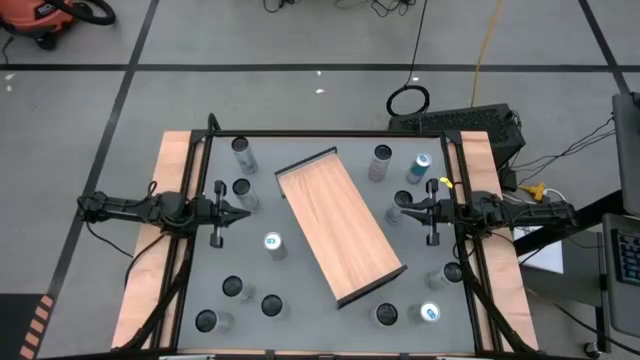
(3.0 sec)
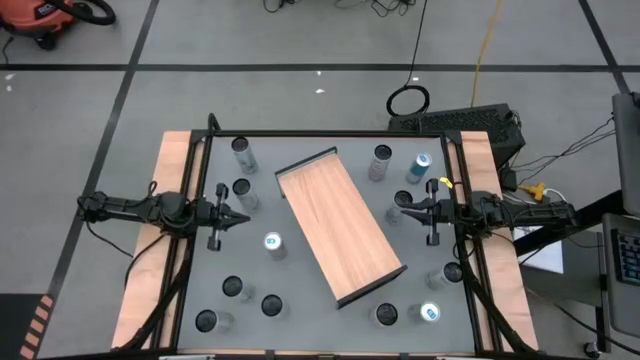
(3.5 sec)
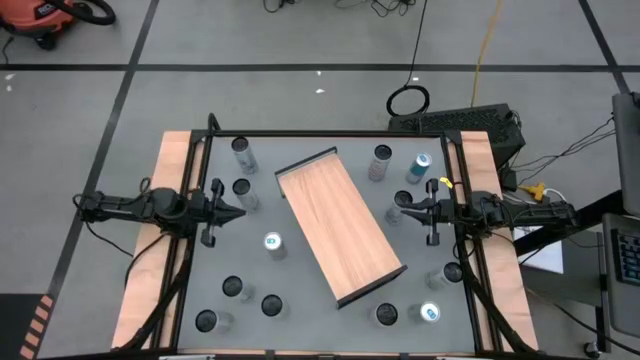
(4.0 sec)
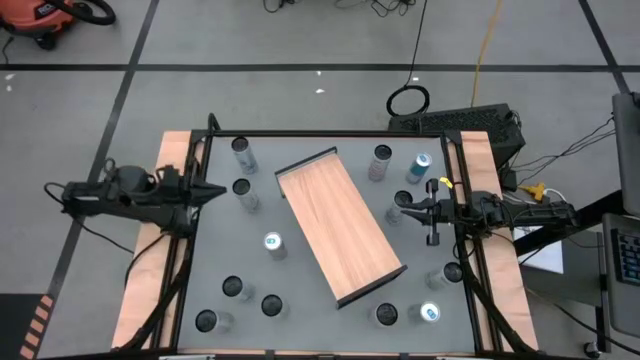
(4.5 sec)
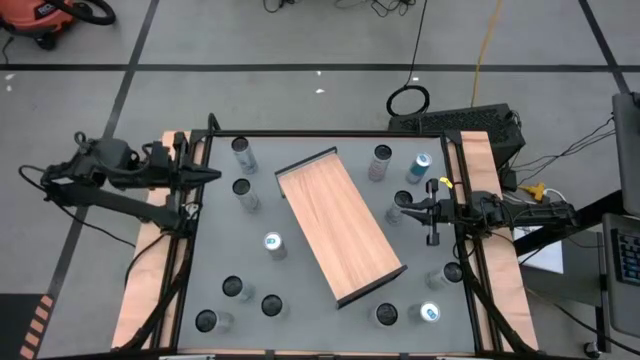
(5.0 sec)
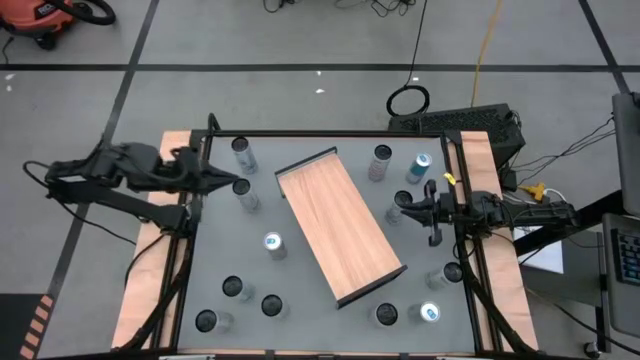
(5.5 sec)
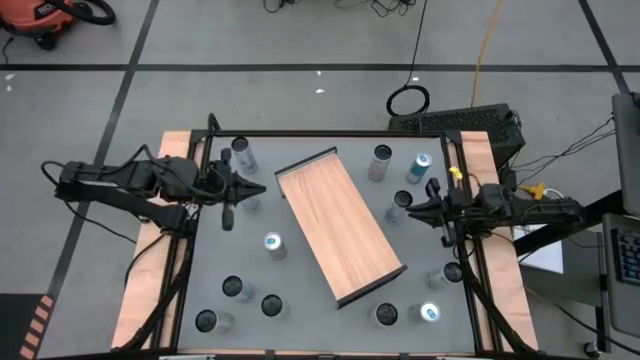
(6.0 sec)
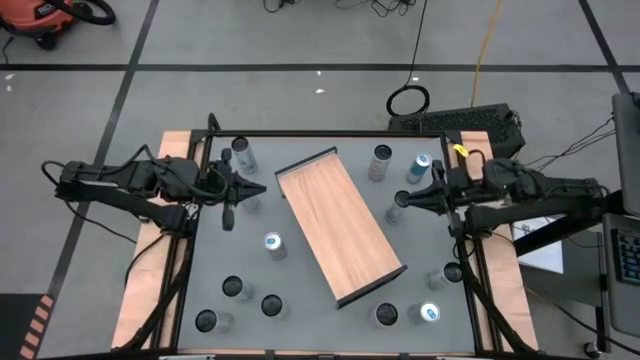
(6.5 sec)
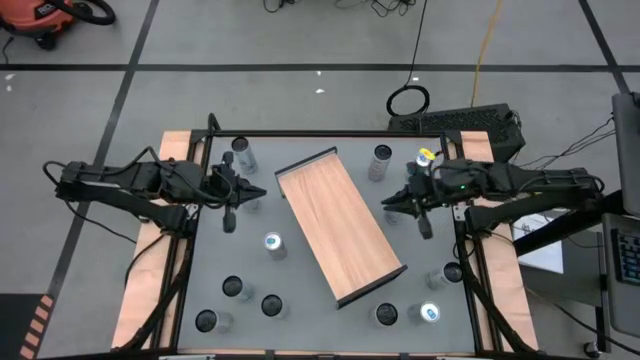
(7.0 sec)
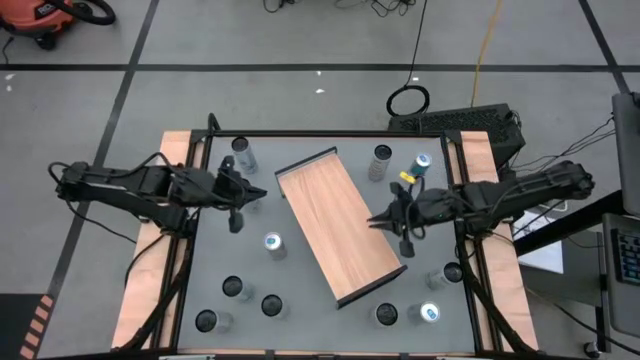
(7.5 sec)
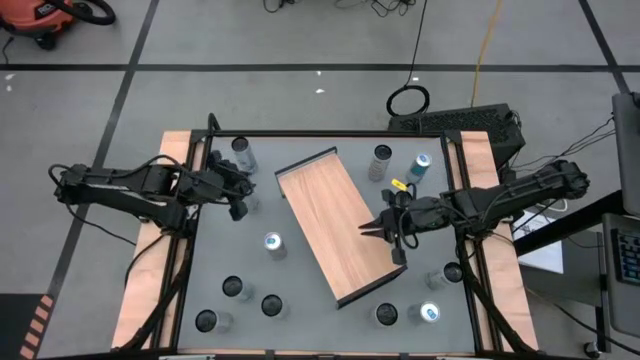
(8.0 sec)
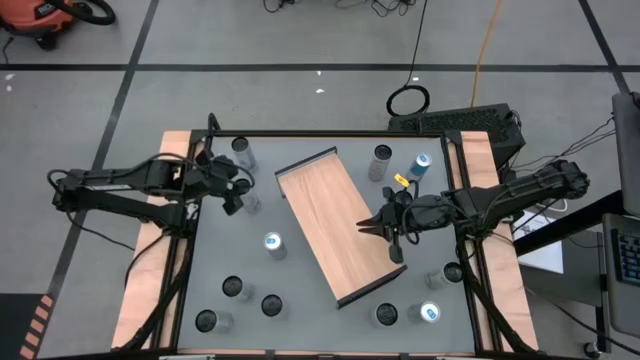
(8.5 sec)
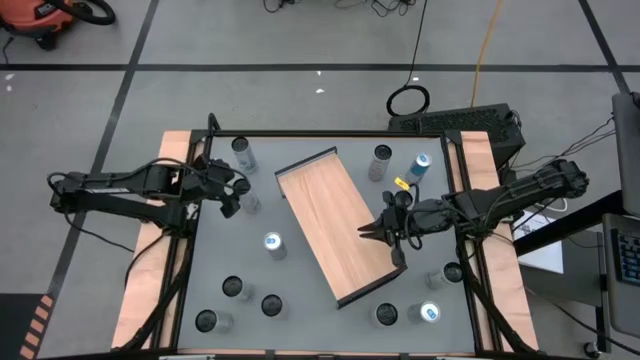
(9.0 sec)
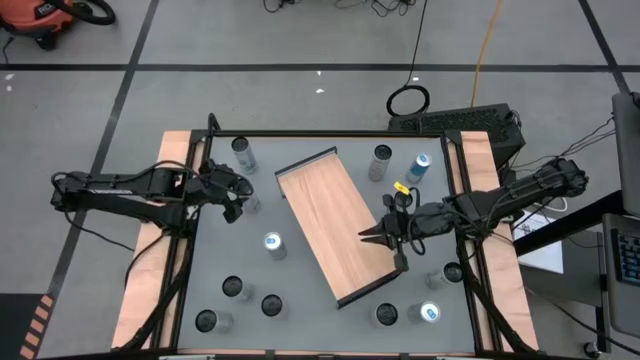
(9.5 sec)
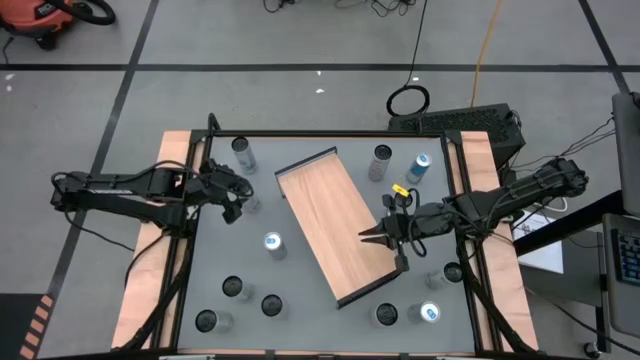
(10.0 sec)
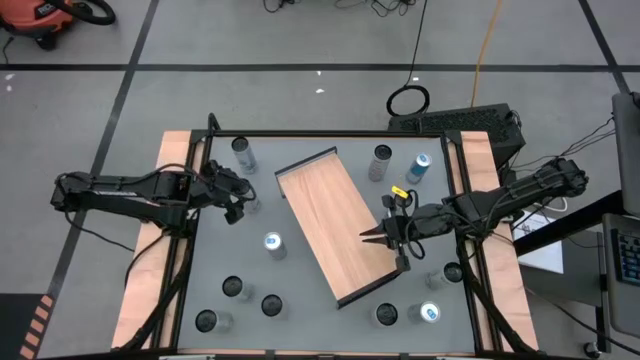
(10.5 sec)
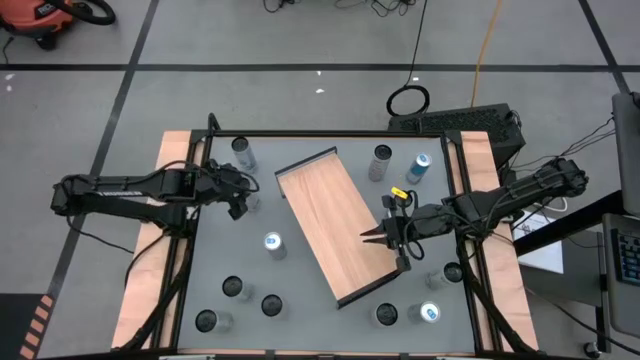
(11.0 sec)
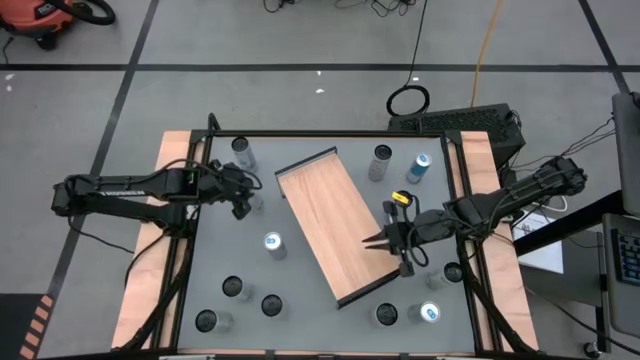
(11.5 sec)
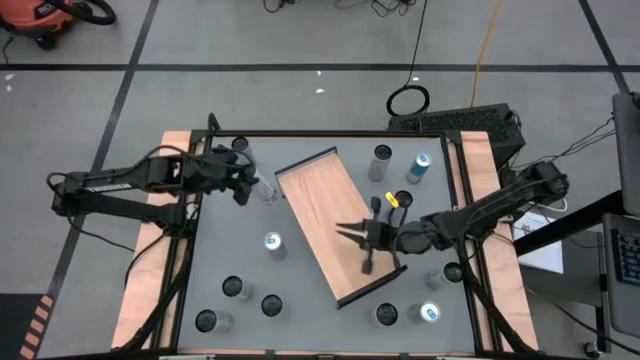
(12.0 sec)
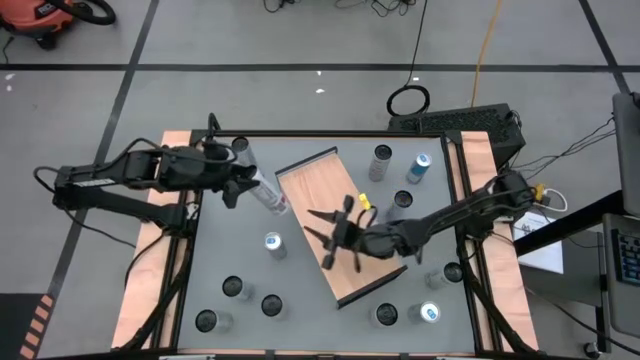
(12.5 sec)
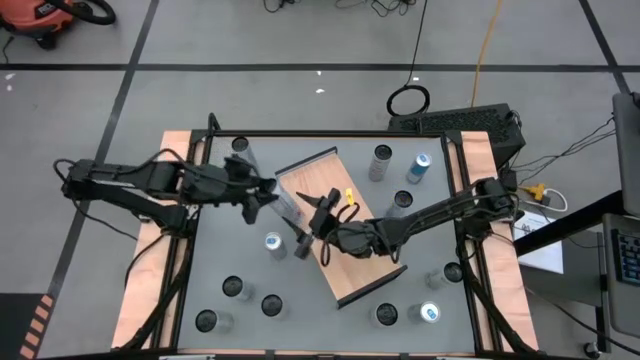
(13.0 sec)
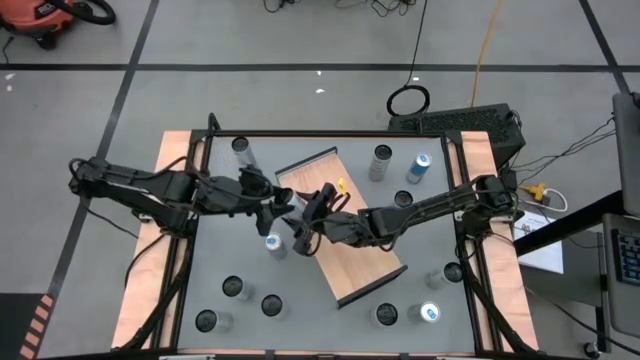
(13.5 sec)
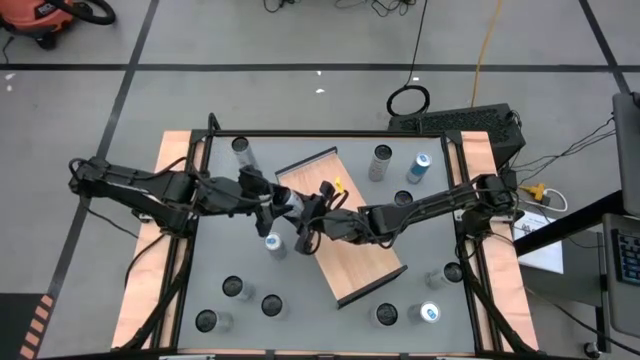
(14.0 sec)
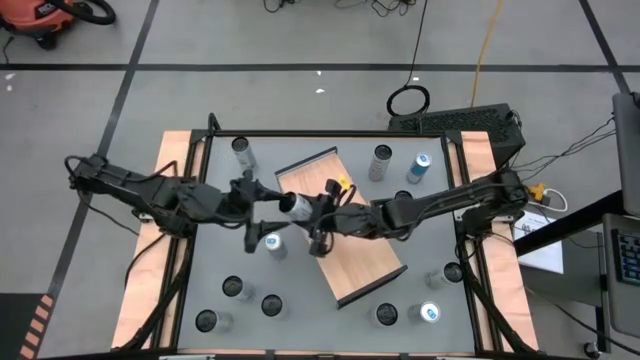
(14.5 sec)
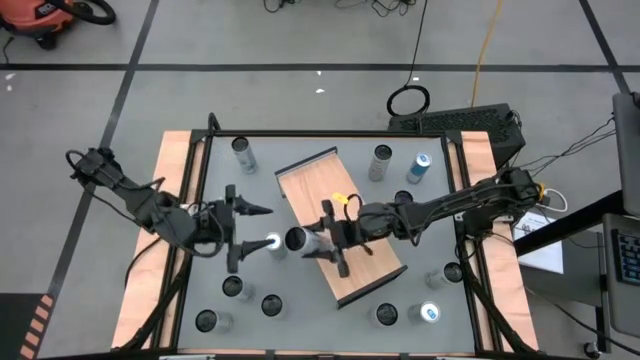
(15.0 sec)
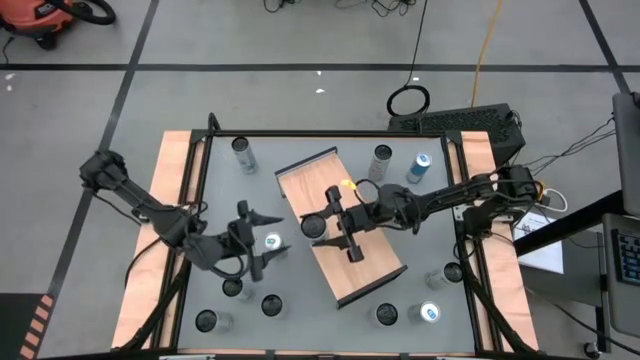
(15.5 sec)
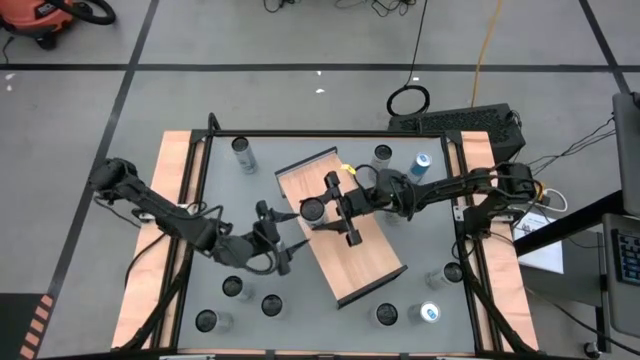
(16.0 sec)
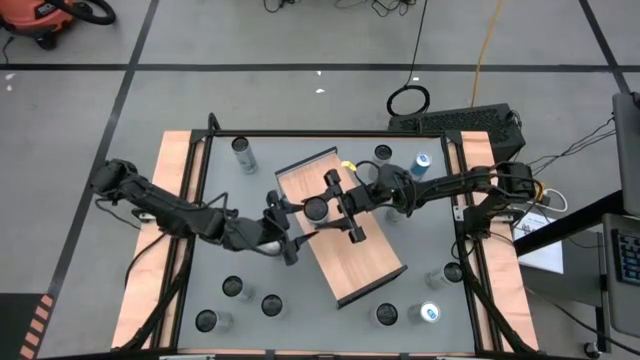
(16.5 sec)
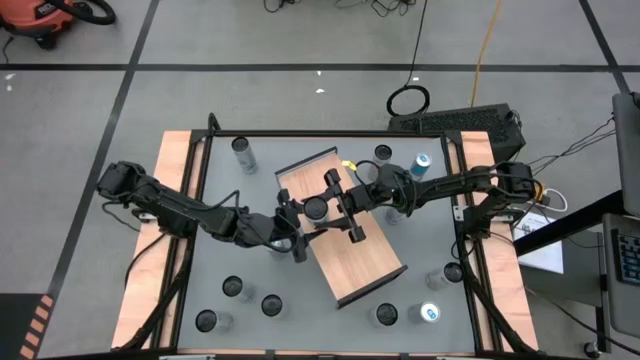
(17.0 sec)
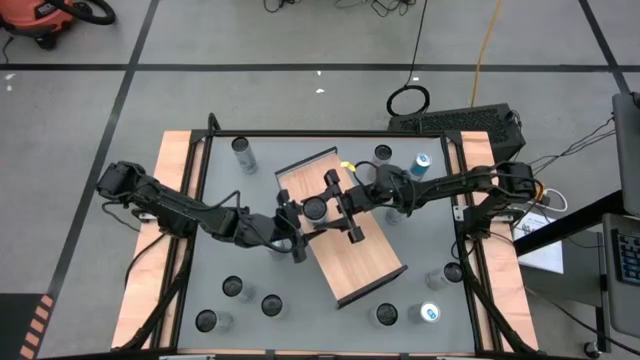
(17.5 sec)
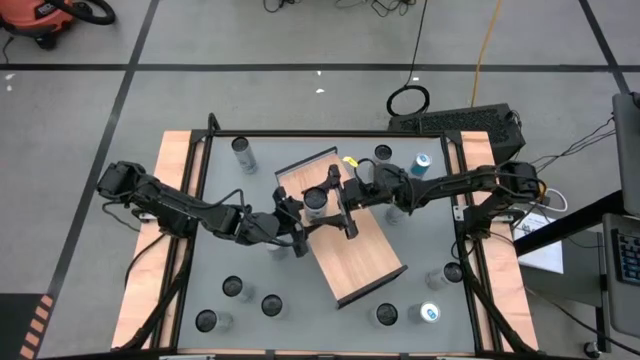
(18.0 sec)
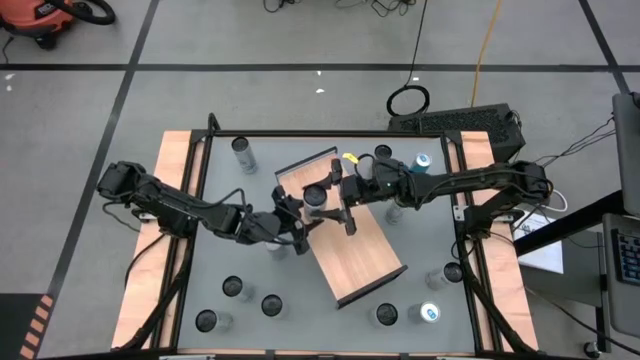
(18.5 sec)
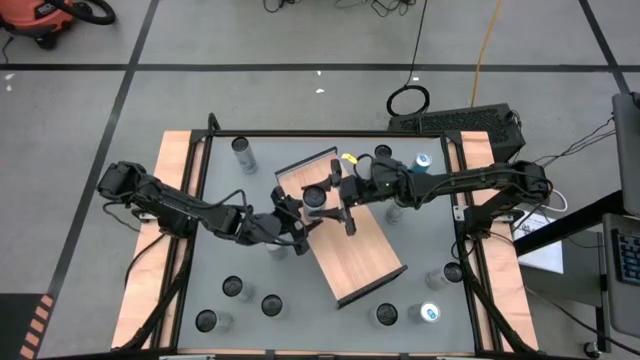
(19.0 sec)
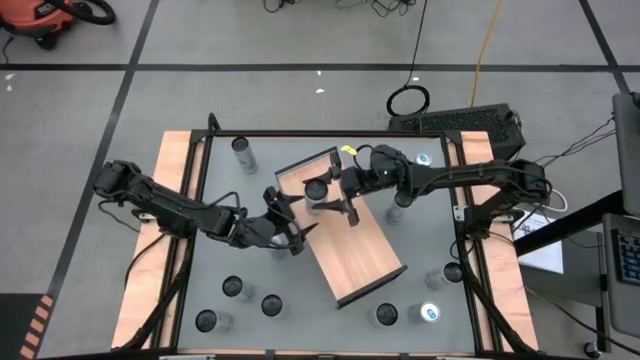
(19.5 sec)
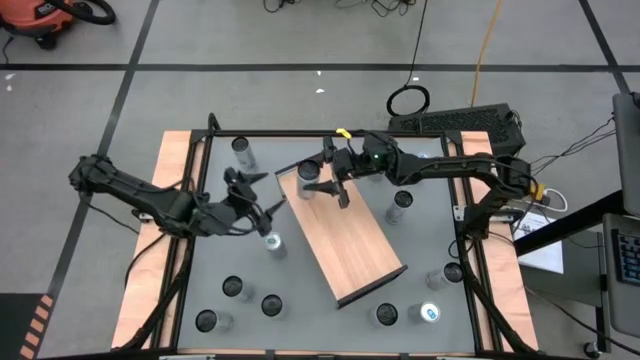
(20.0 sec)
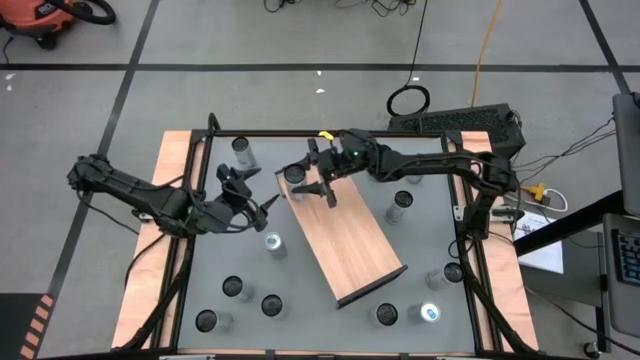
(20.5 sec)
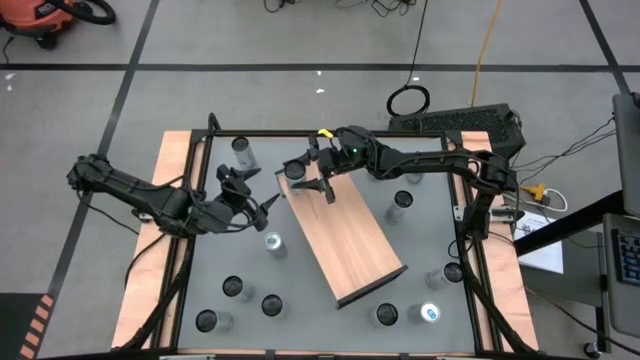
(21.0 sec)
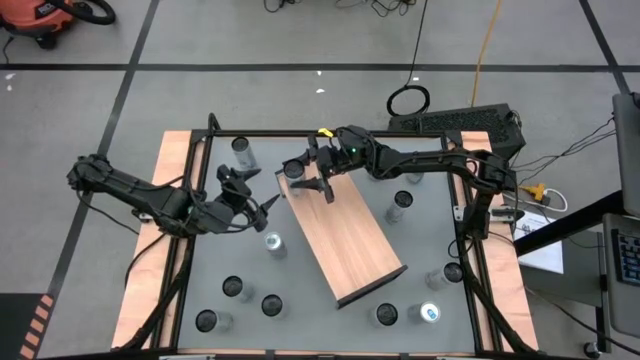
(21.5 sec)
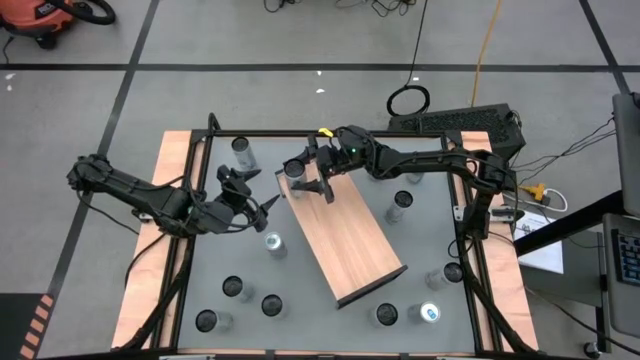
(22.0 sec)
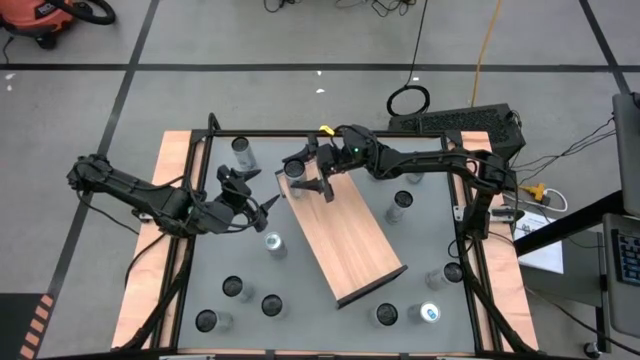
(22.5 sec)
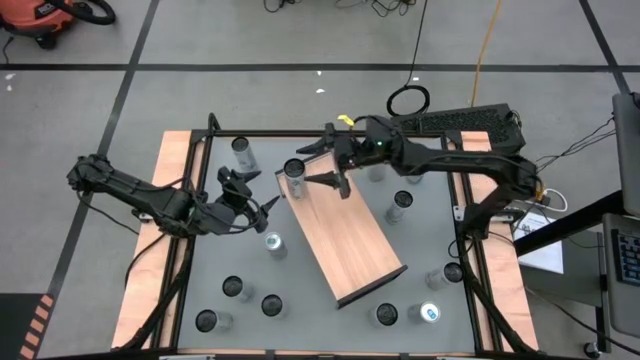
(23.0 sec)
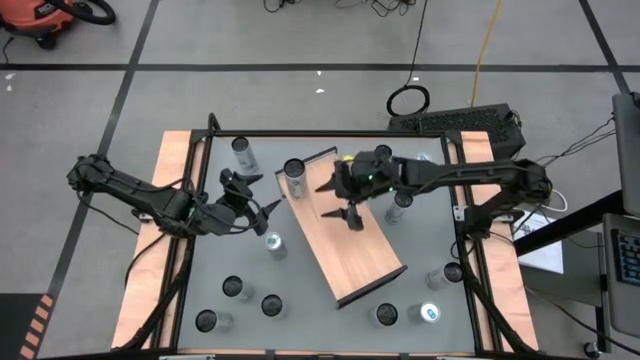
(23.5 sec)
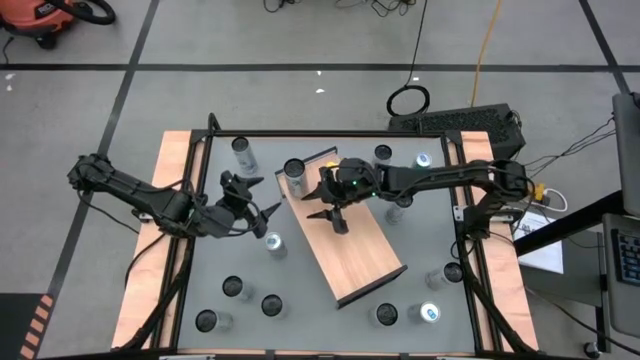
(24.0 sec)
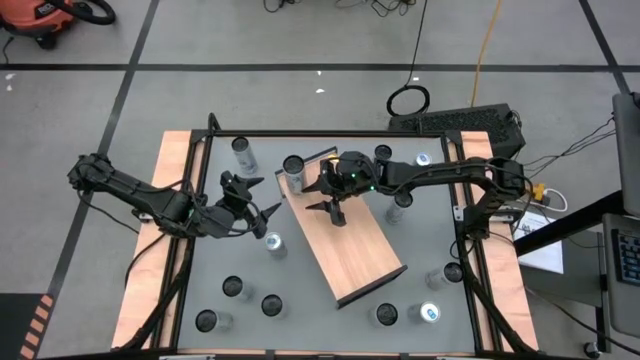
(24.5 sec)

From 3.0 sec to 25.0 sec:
Task: Place canned beverage on shelf
Put the top left white-pink soda can on the shelf
